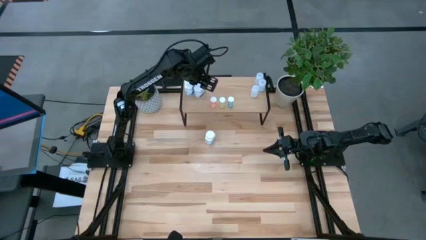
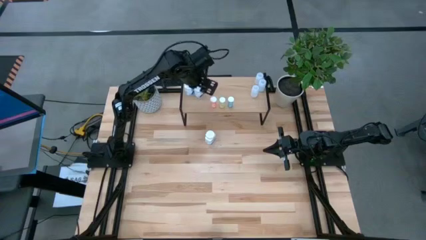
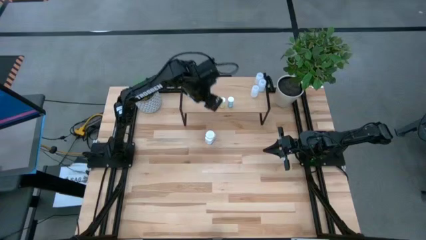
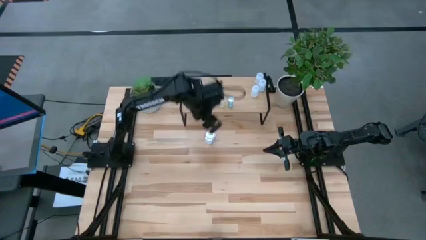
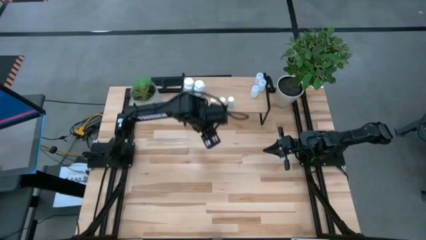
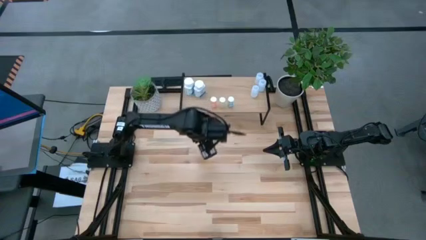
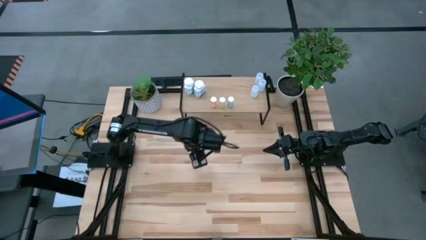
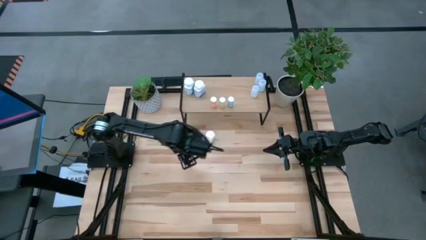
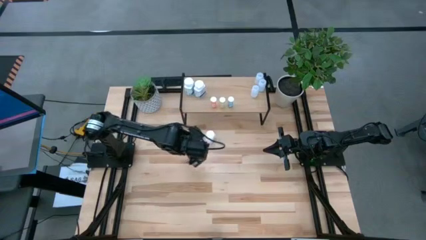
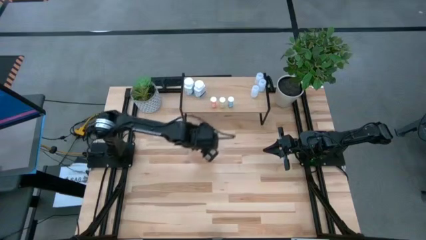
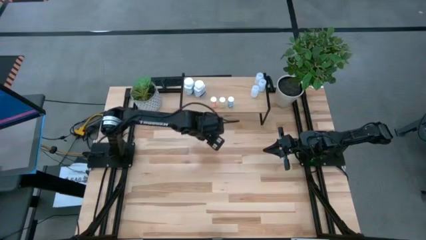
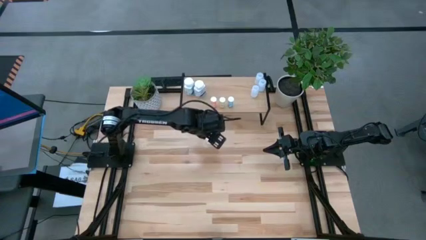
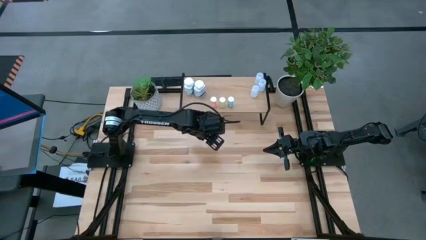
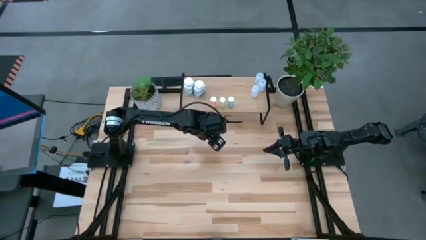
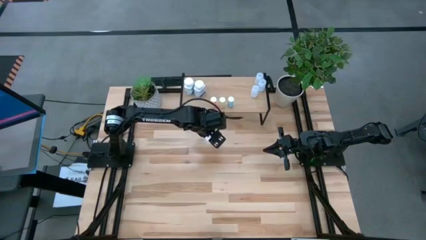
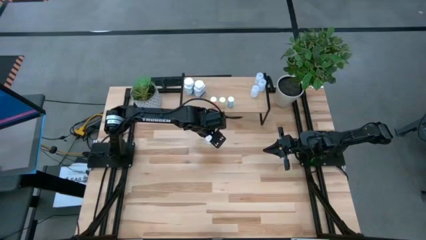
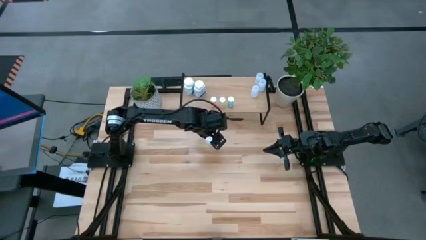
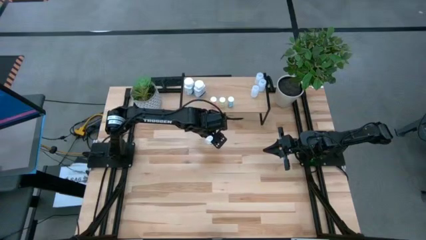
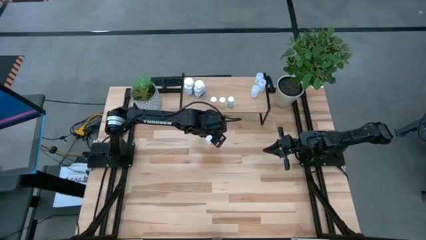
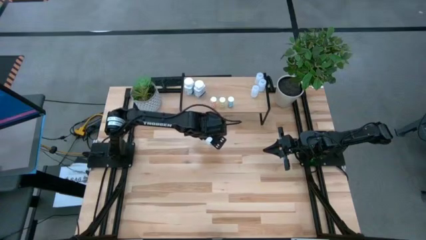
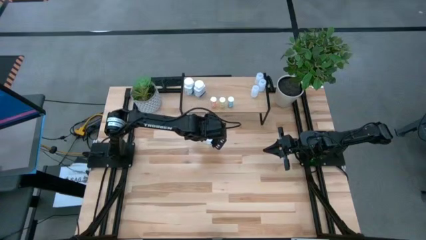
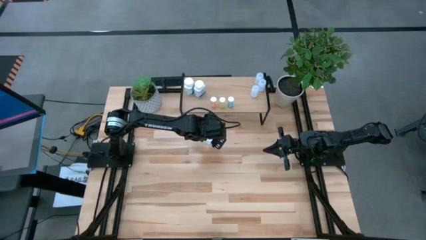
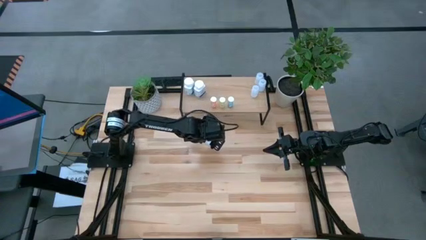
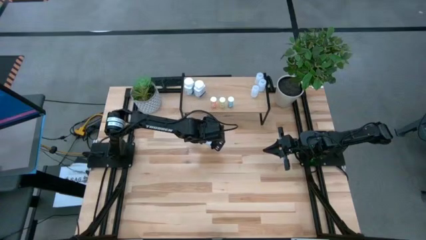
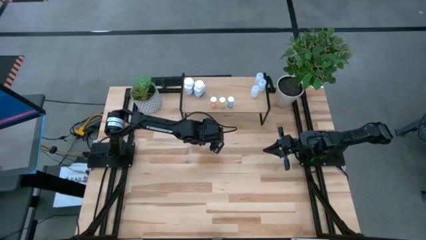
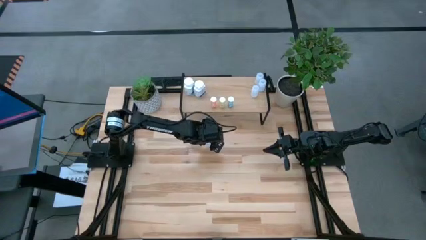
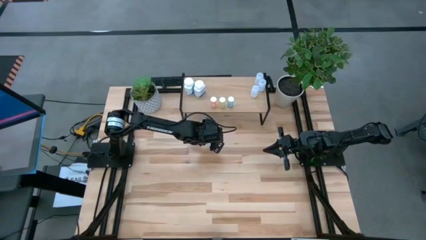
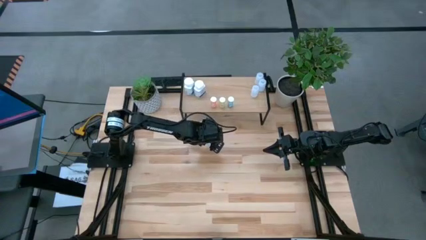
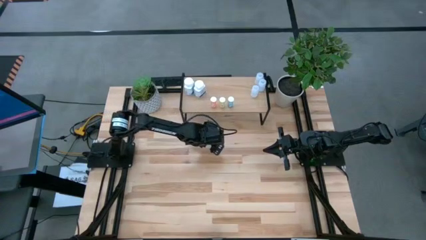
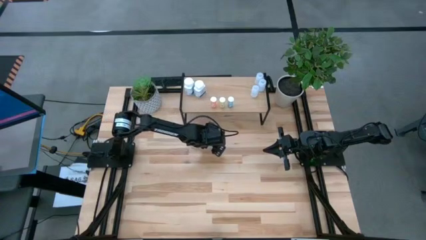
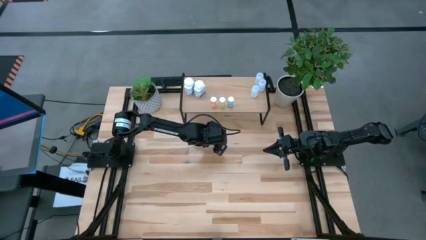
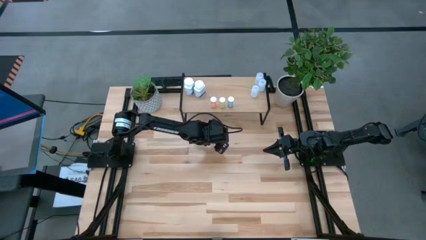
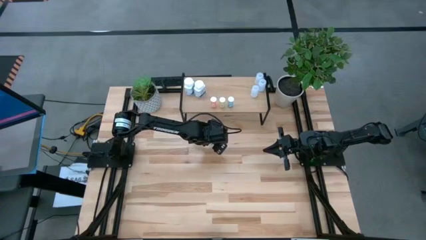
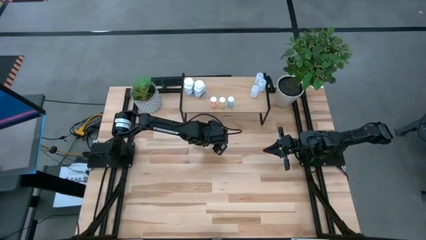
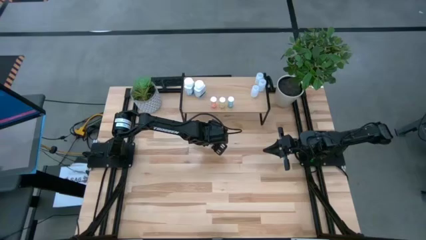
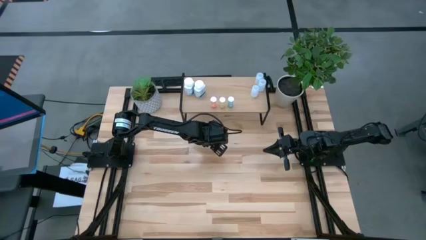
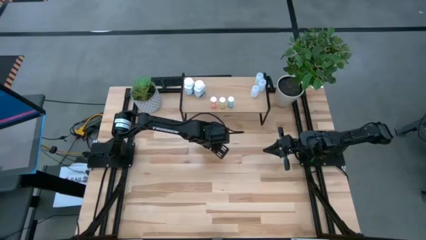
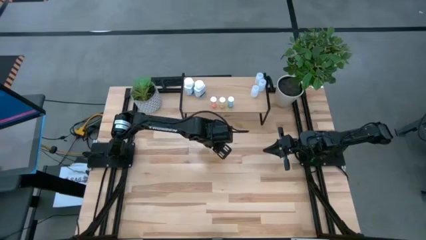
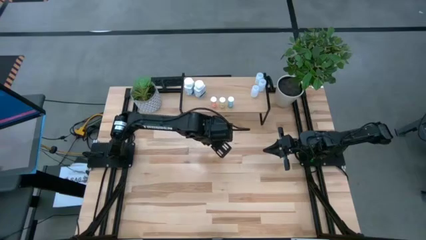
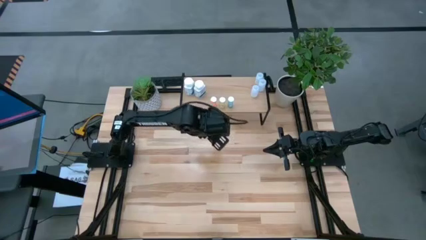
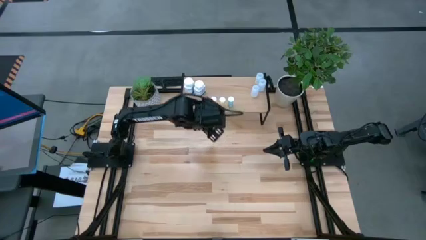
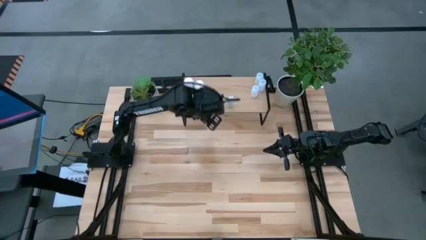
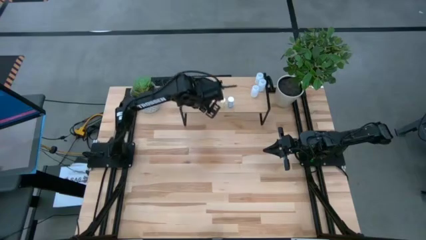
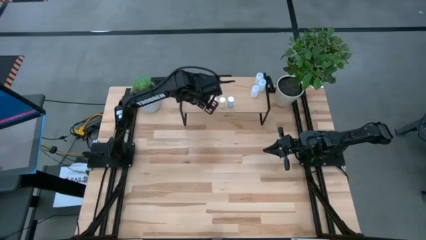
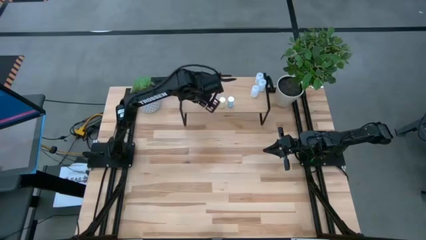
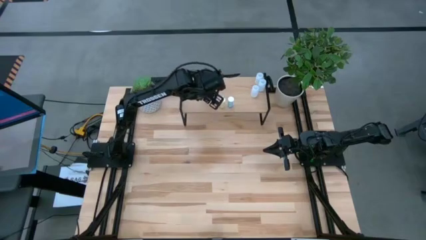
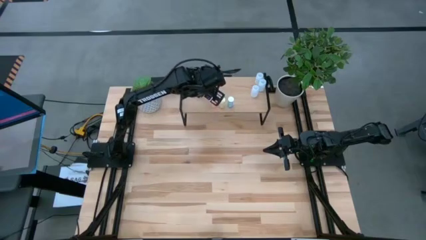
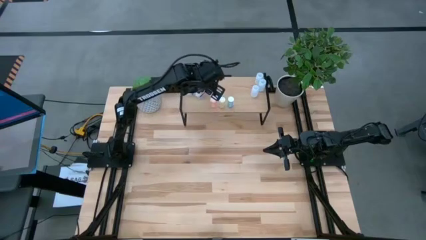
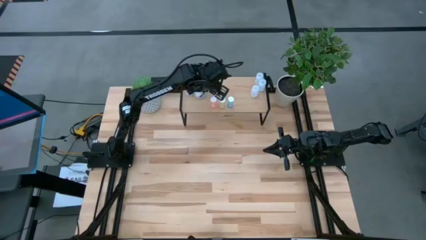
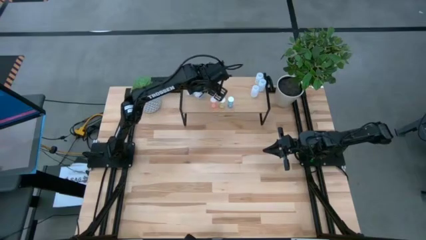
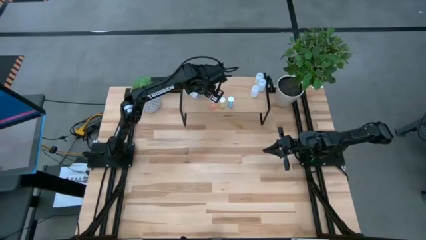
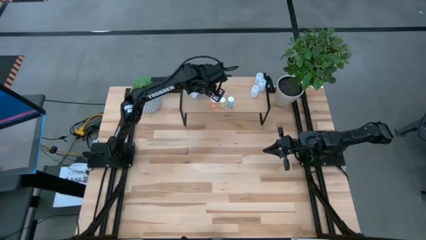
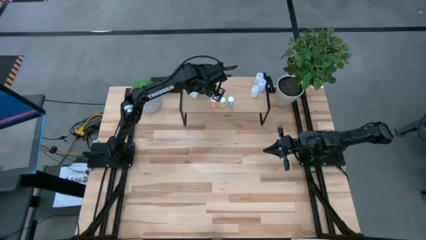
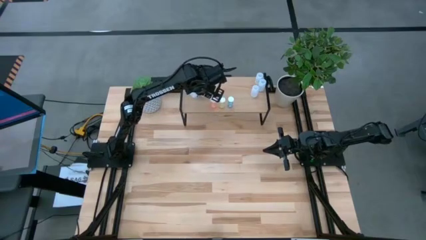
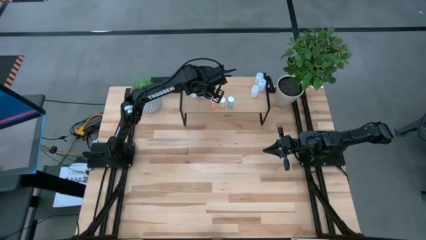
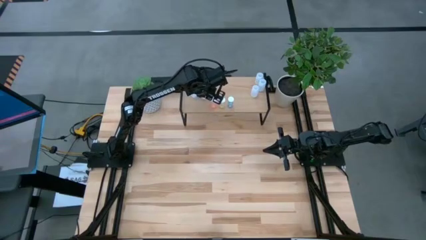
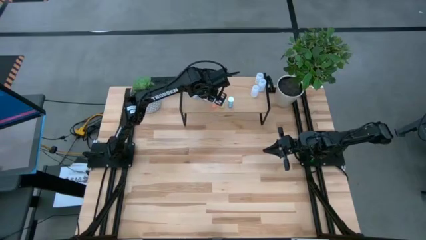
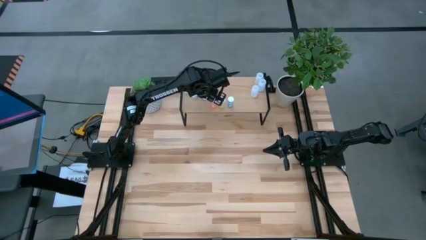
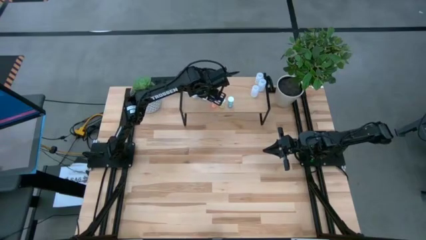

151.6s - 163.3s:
Task: Pick and place medicine bottles onto shelf by color
Put the white medicine bottle on the shelf
